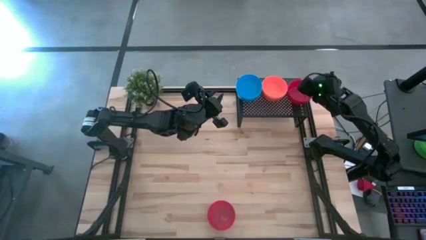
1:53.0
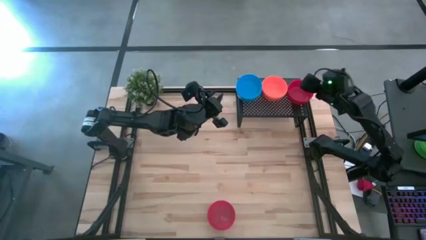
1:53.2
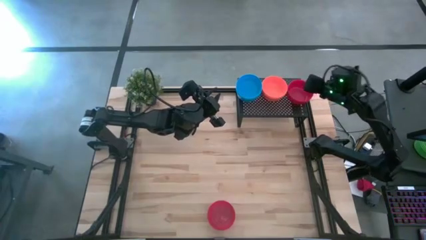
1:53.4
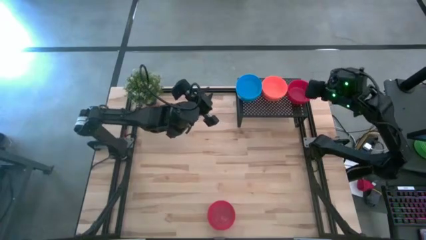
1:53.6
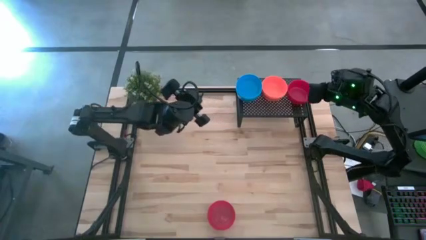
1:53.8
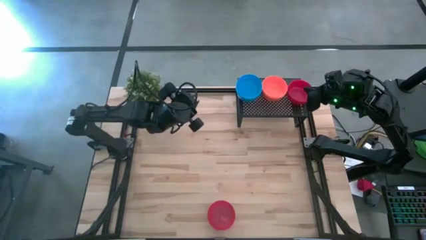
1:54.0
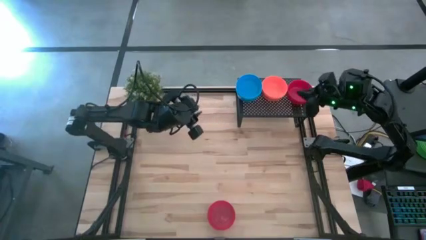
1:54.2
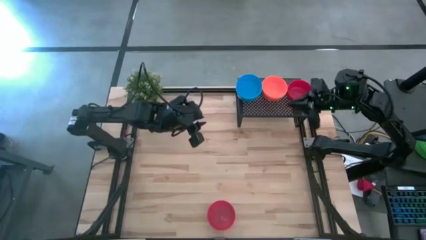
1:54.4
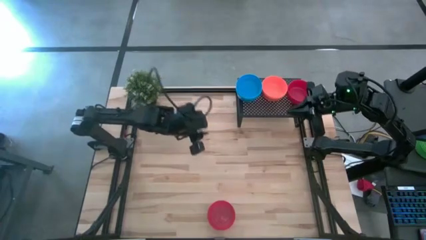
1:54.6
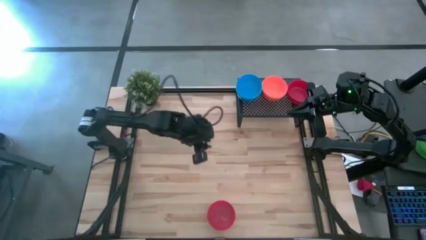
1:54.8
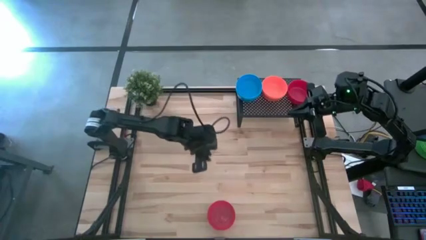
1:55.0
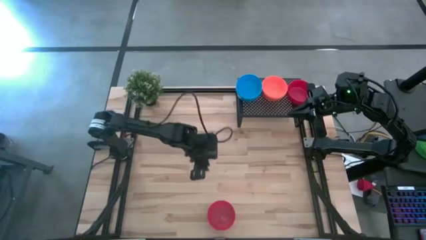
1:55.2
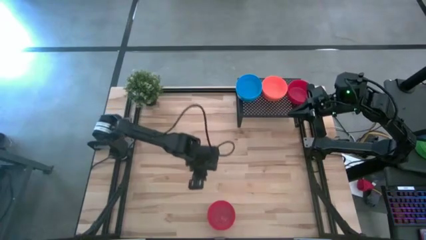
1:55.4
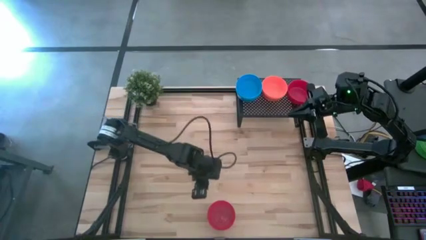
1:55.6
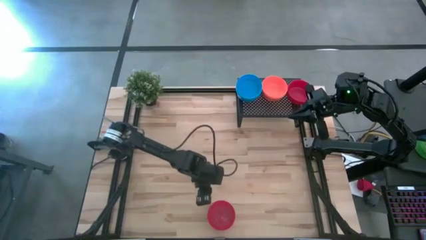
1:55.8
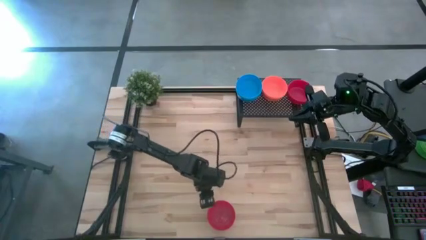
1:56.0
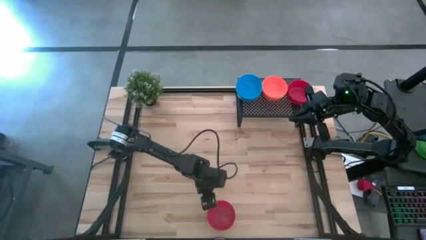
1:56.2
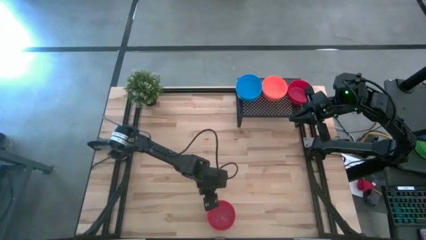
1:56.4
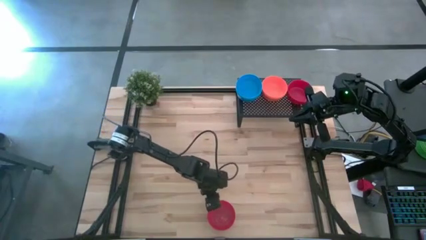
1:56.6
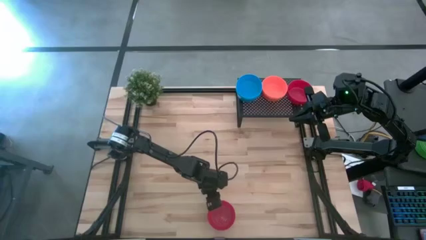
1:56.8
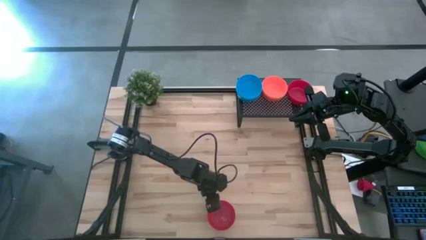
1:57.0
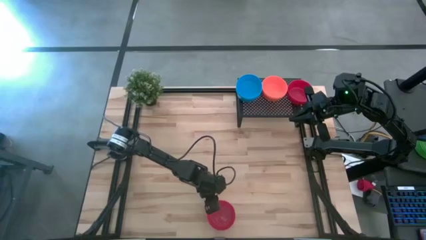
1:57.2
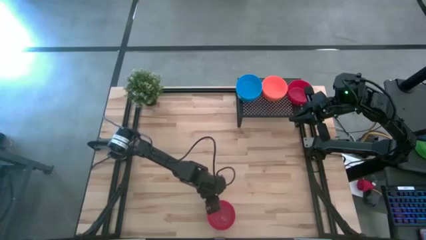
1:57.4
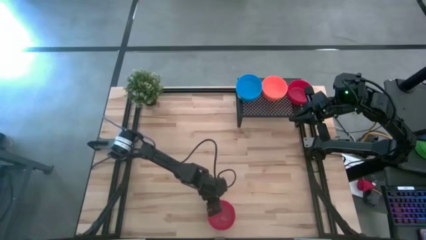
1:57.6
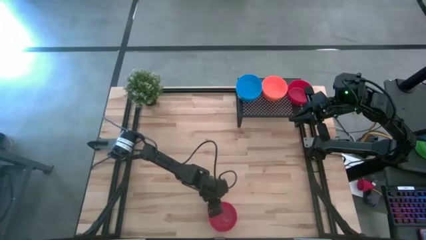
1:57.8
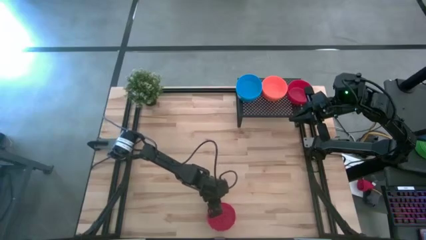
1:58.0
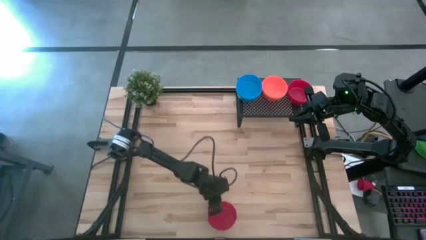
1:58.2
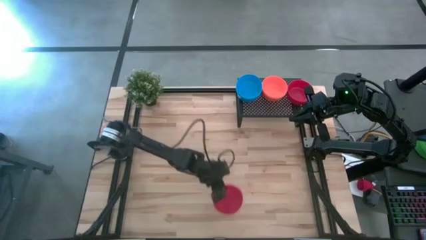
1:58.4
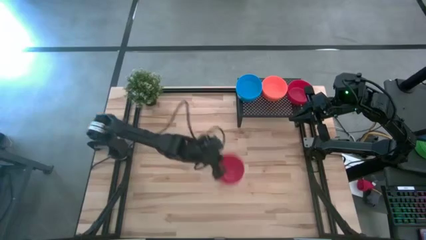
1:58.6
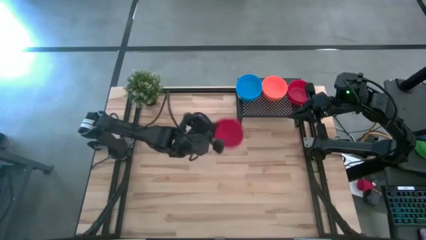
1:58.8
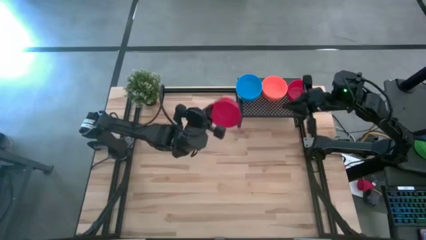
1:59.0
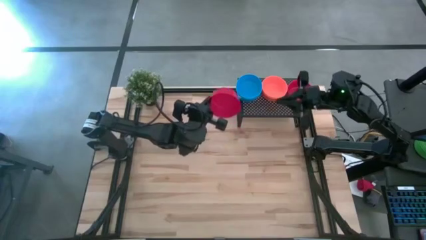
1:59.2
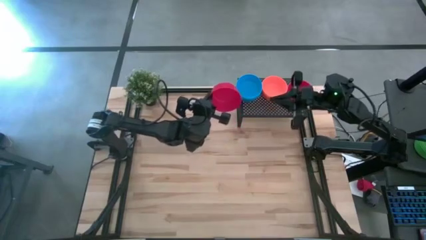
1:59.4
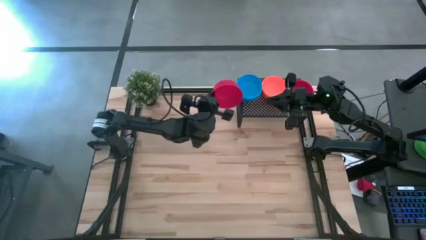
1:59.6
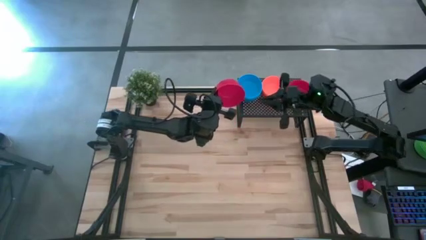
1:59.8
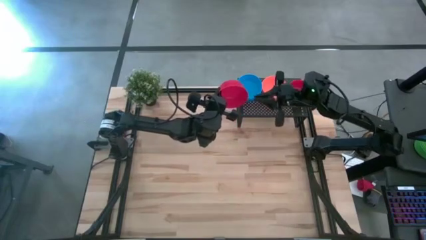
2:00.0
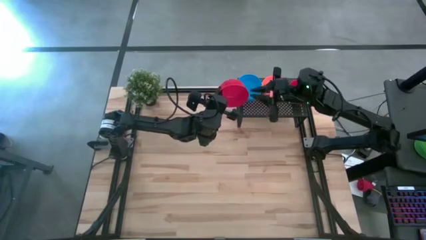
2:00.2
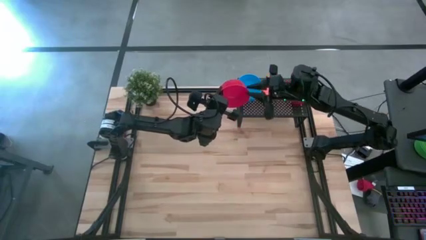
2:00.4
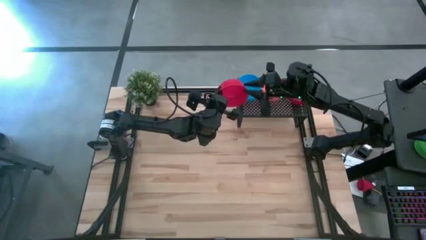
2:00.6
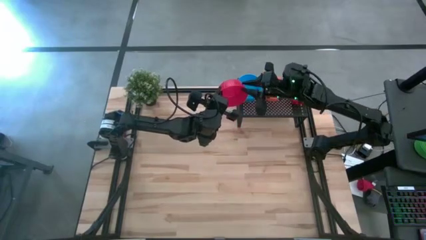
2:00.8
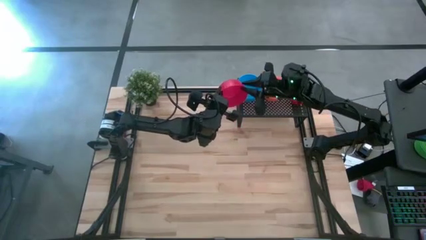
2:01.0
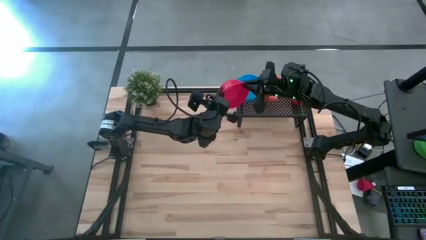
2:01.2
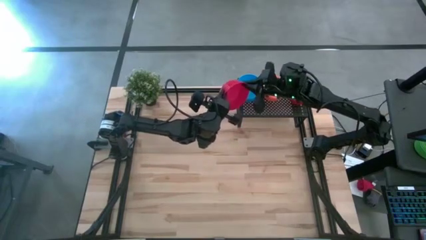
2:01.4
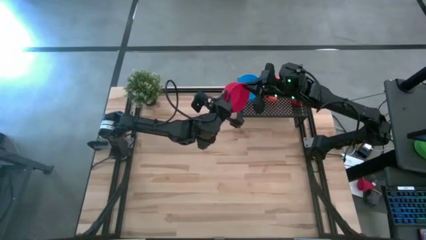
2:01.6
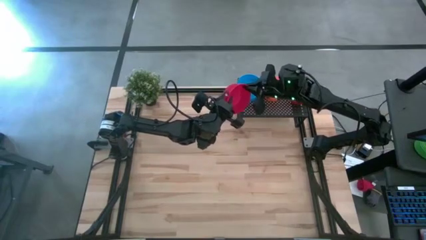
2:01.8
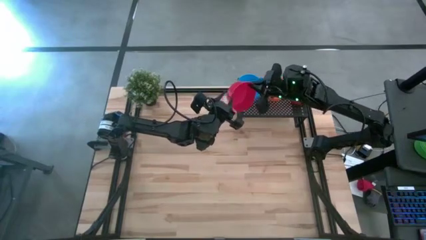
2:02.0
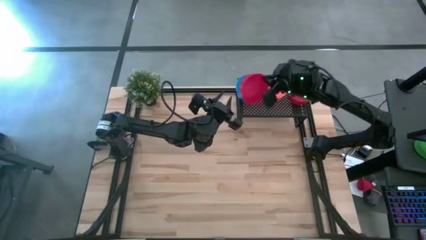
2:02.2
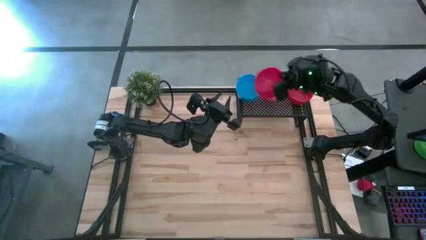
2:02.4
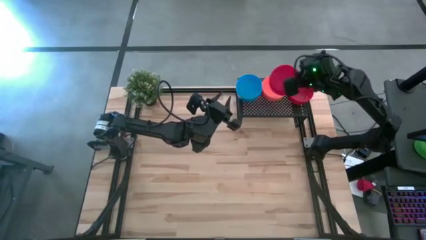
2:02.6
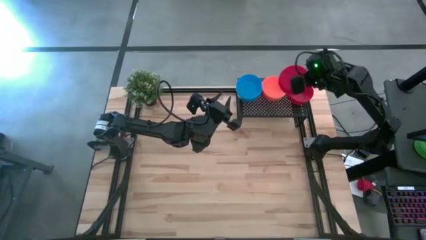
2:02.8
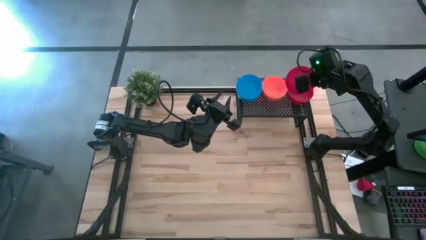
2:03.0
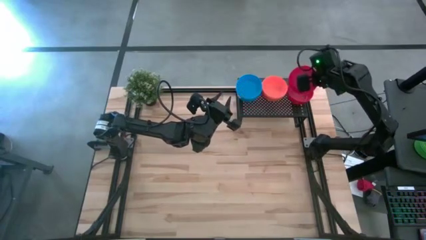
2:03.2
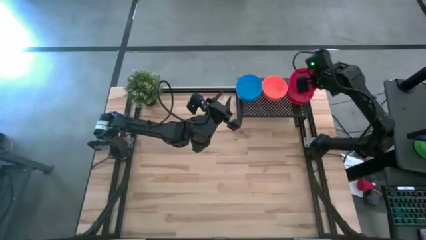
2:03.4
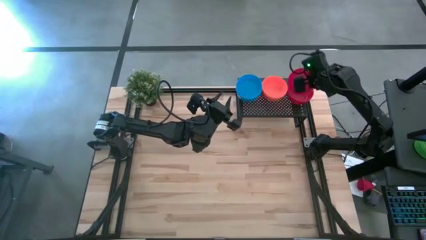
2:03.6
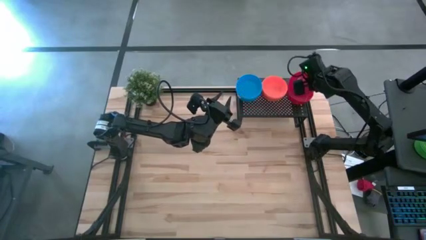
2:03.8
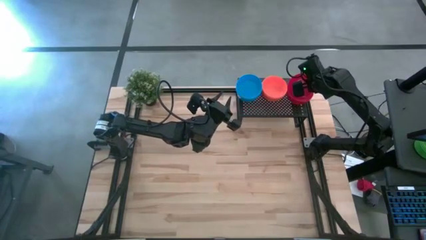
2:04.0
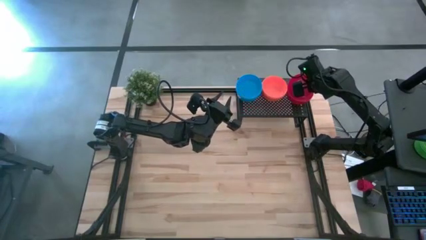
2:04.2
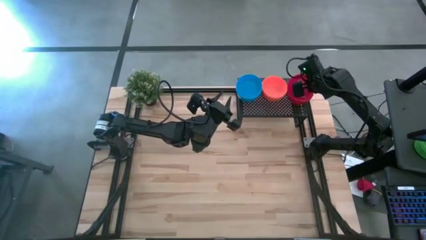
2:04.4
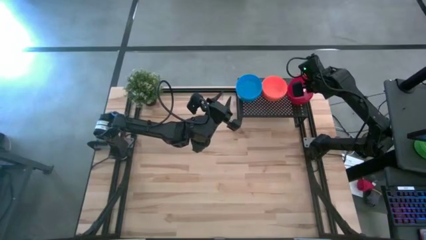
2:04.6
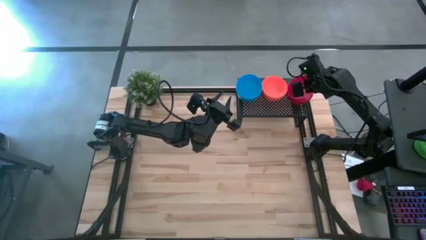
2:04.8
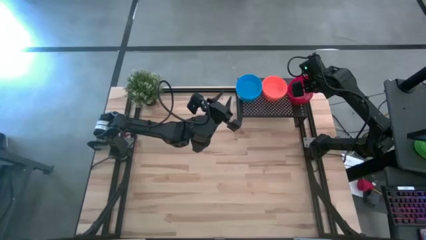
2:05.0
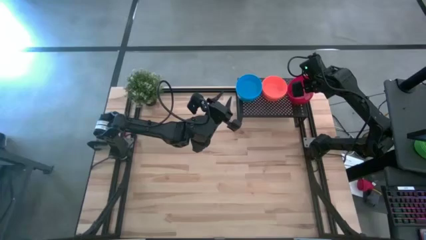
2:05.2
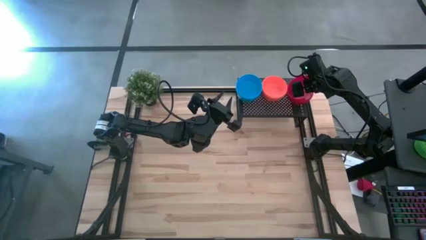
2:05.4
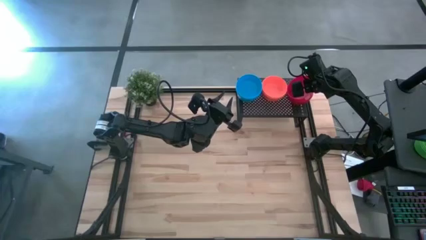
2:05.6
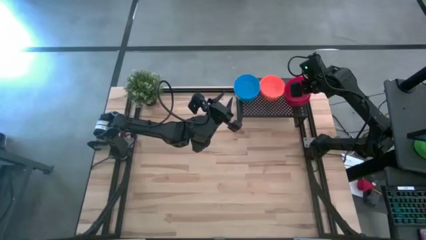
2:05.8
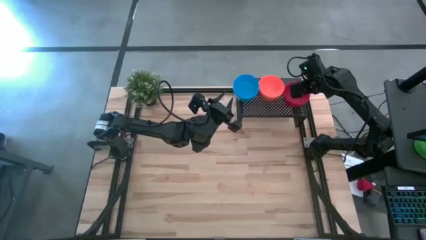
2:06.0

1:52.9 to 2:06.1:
Task: Pick & Place Mini bowls
Stack the red bowl on the red bowl

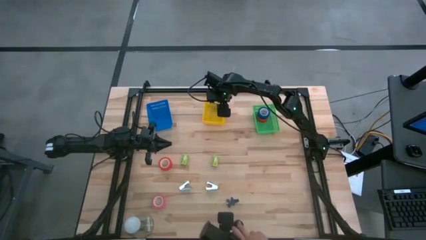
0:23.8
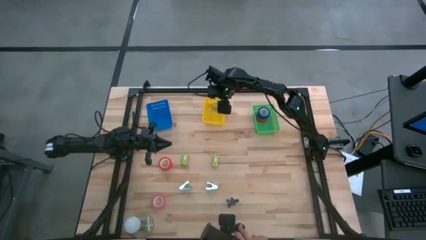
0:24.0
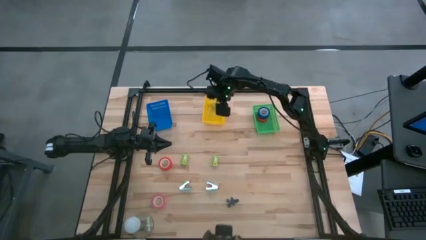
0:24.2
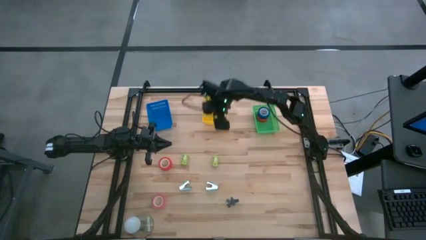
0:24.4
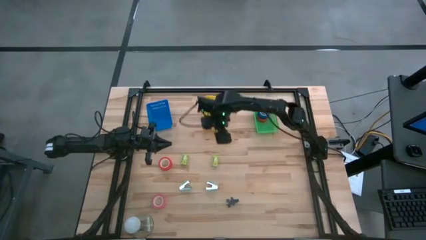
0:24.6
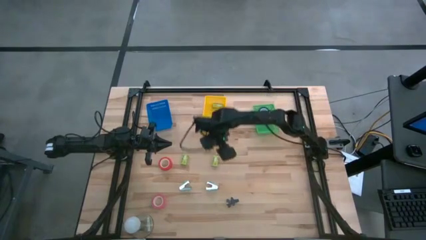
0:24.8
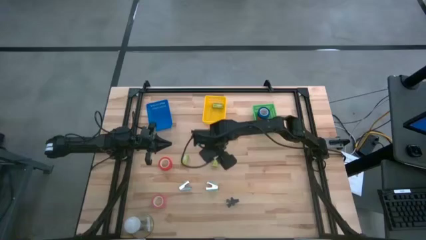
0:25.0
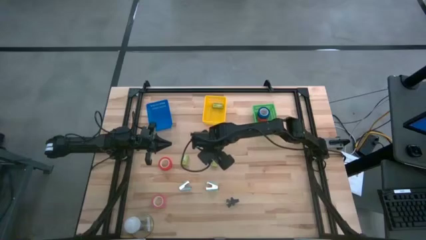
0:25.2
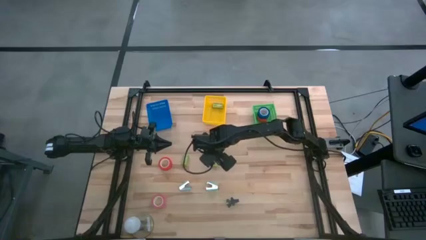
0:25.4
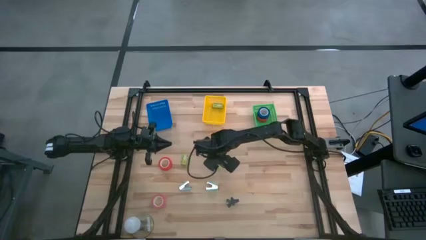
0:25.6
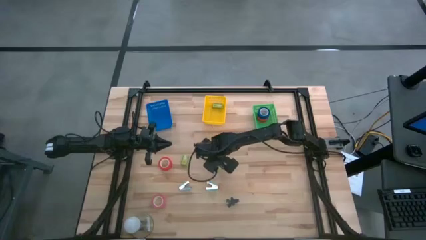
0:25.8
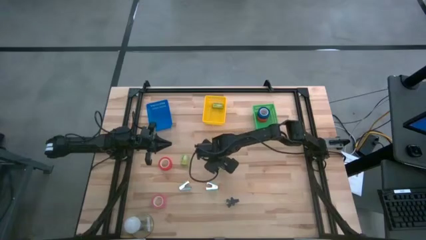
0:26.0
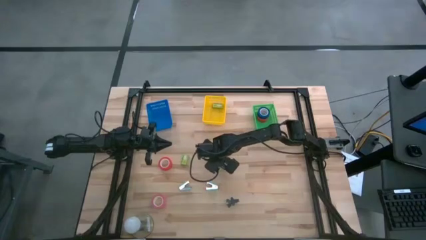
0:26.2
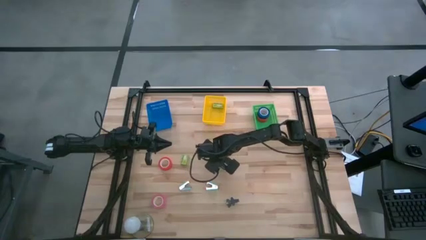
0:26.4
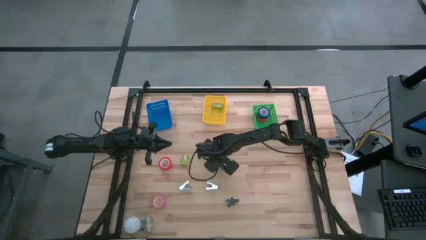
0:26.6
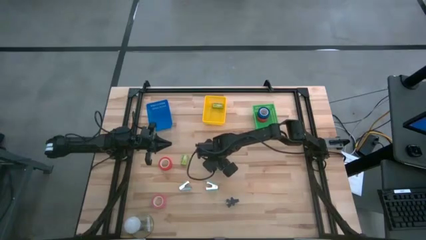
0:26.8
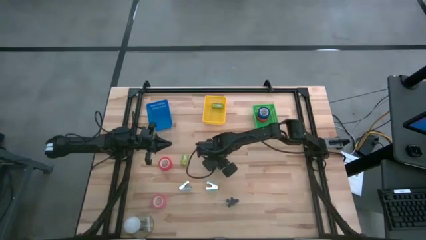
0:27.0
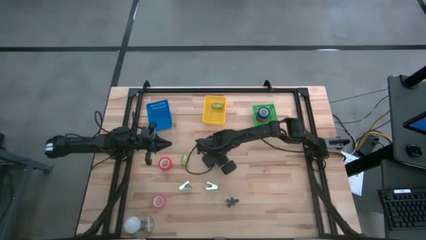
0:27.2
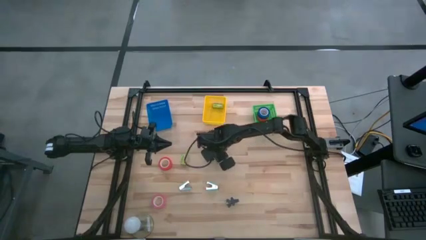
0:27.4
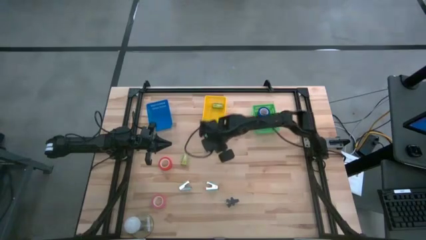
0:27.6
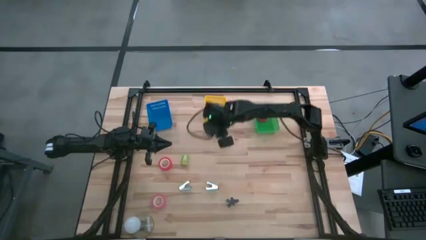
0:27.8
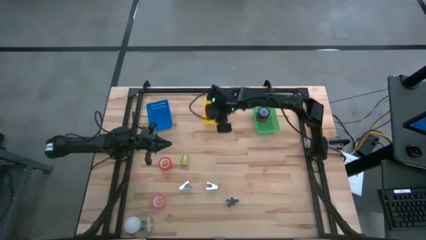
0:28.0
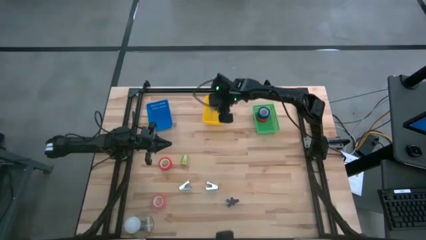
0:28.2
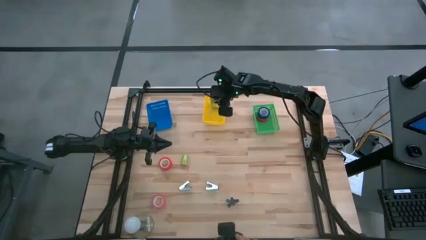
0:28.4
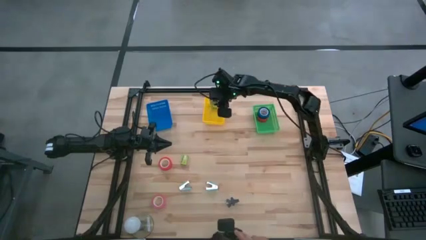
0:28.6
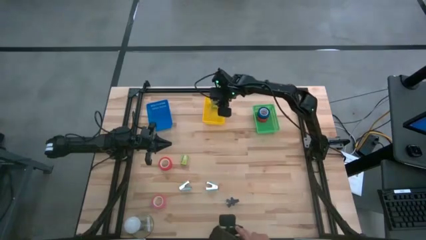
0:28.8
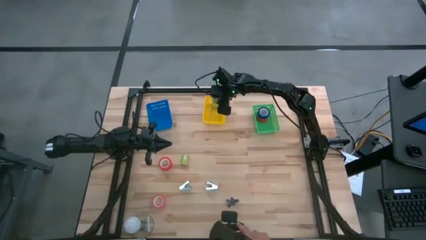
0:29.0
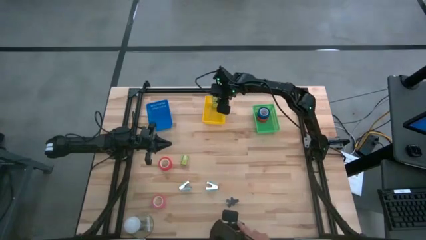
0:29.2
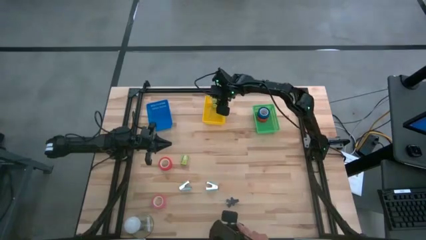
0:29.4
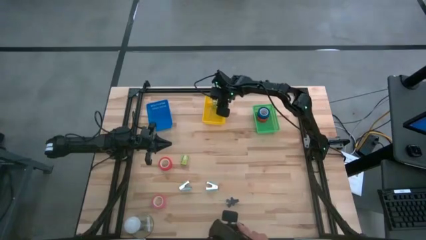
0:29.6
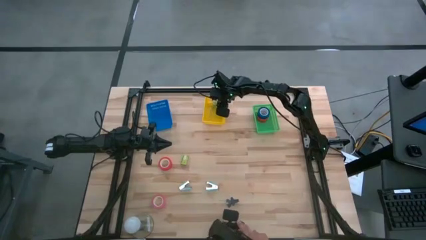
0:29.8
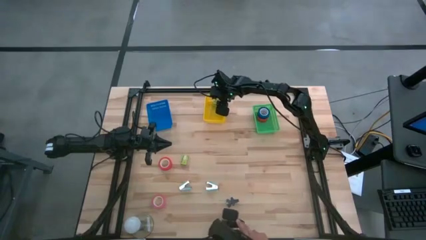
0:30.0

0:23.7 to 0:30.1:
Task: Pick and place Stapler, Stapler remover, tape
Put the right staple box into the yellow bin
